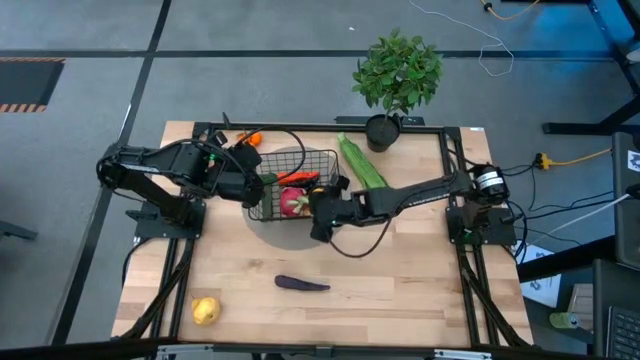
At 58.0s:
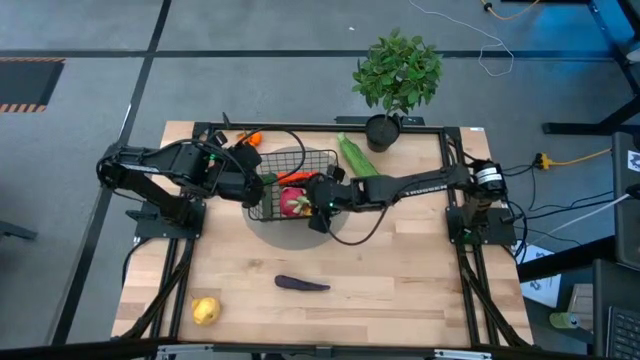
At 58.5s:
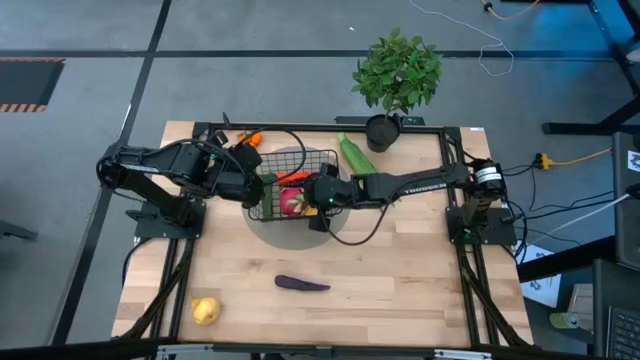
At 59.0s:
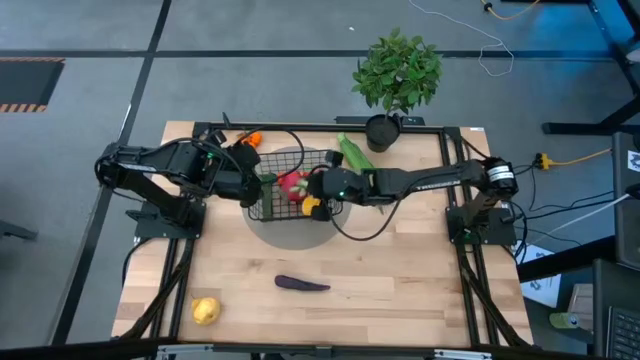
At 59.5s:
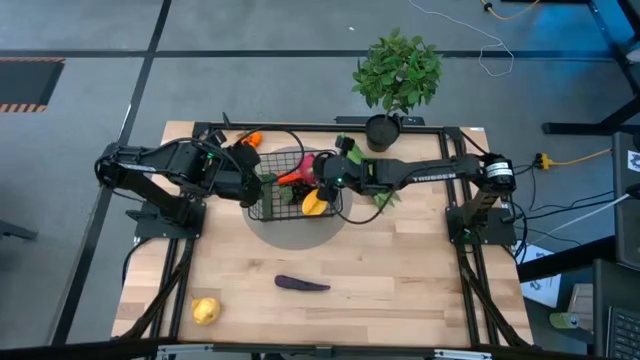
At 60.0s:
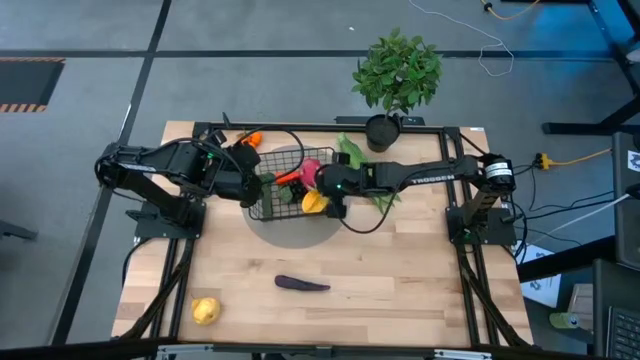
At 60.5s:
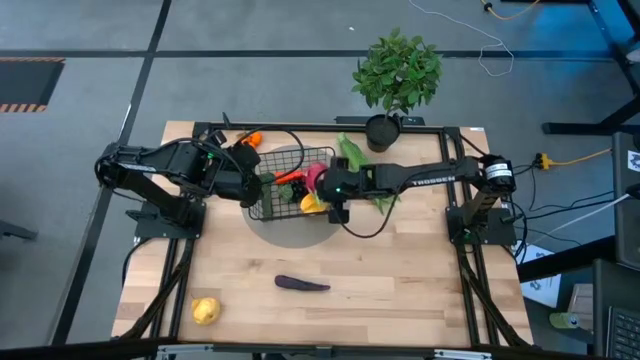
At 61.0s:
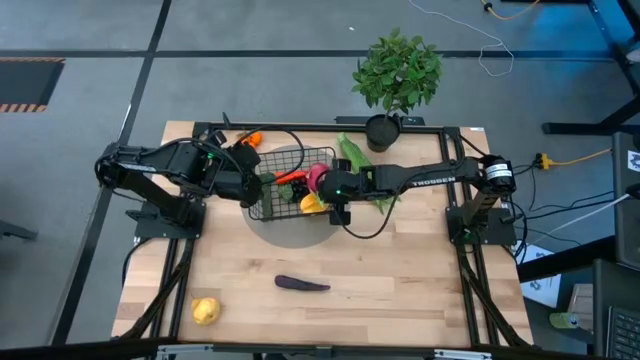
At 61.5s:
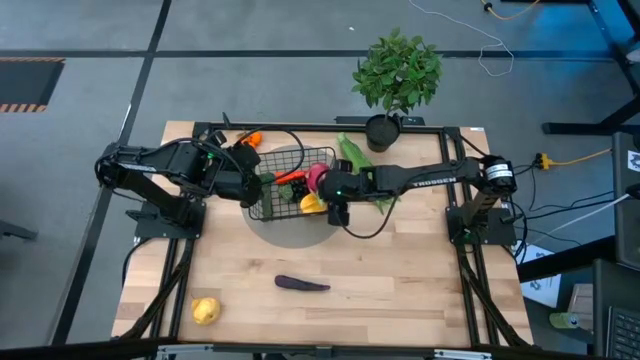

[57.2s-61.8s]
Task: Build produce basket
Adjust the pink dragonfruit in the black wire basket

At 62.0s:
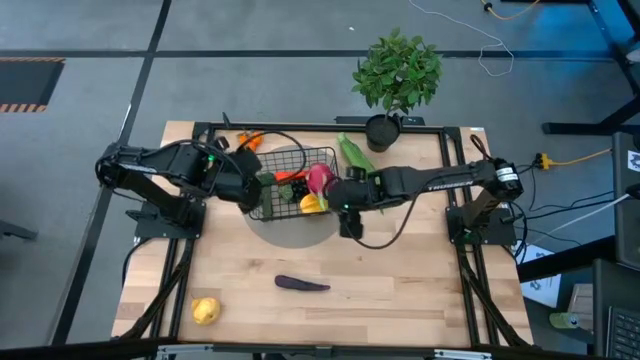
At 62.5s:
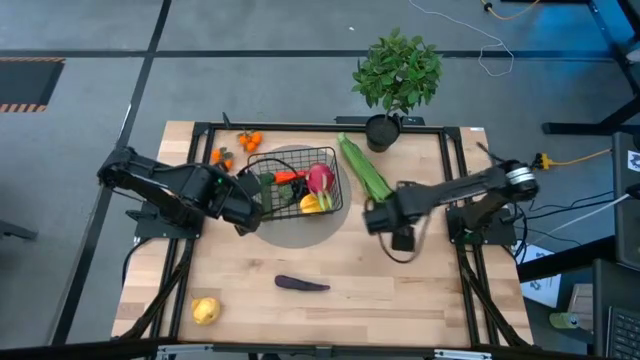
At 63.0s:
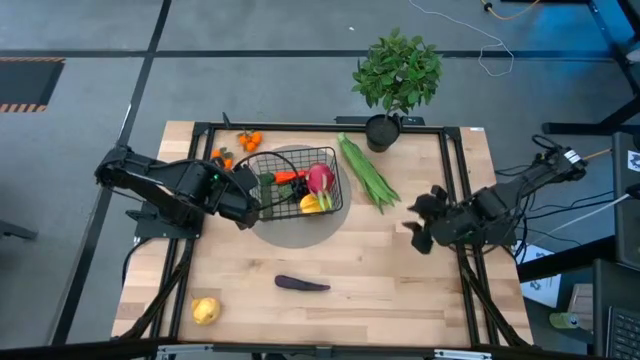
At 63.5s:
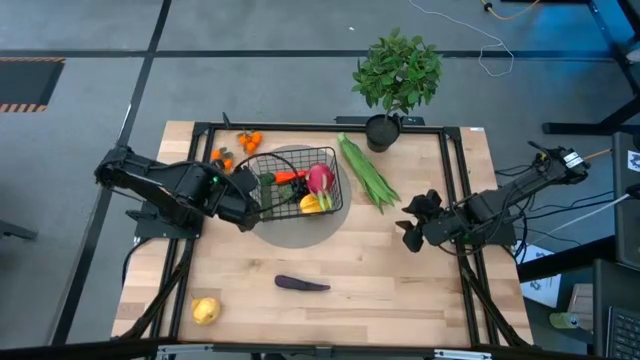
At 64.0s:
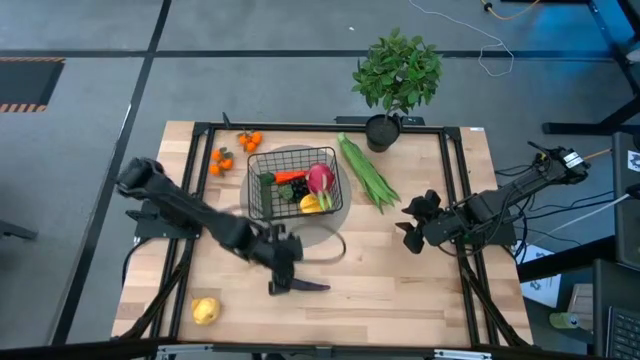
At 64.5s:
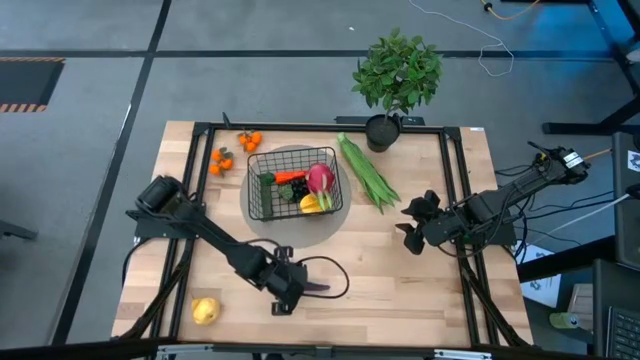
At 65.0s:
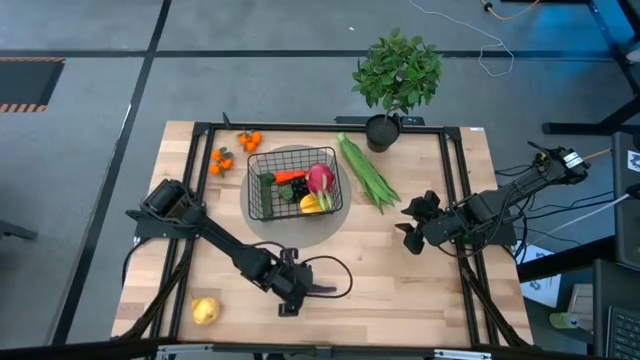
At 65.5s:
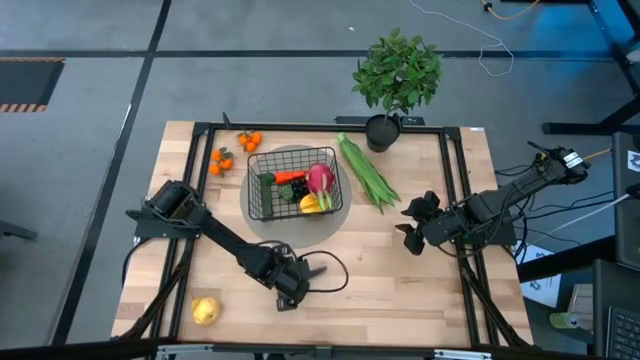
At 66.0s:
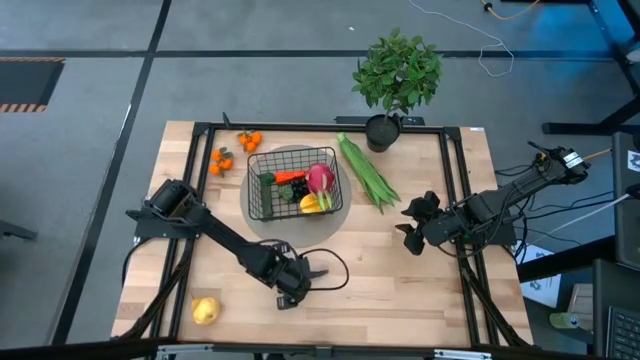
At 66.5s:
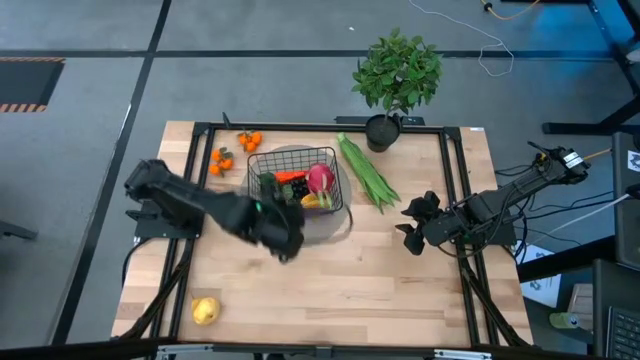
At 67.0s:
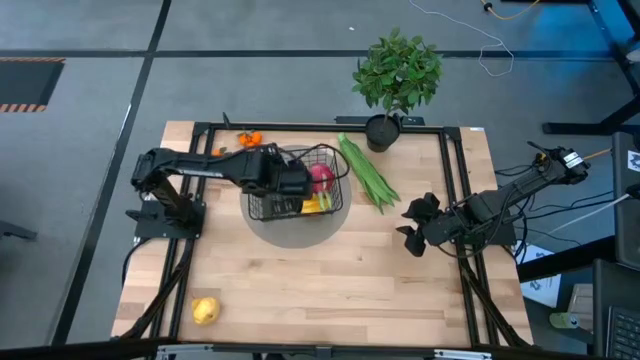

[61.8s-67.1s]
Put the dark purple eggplant into the black wire basket

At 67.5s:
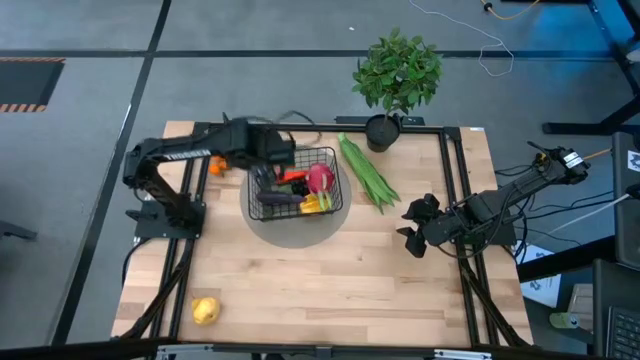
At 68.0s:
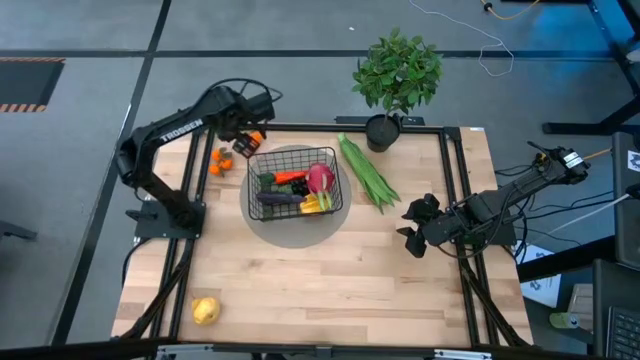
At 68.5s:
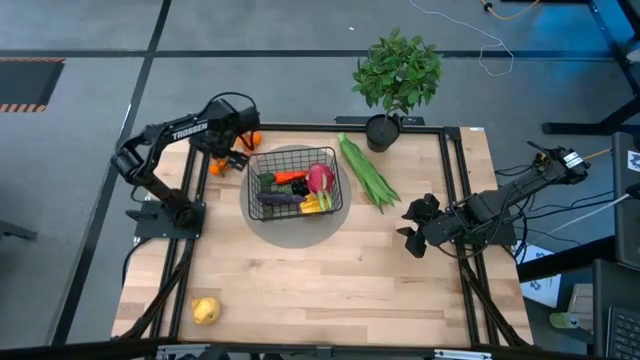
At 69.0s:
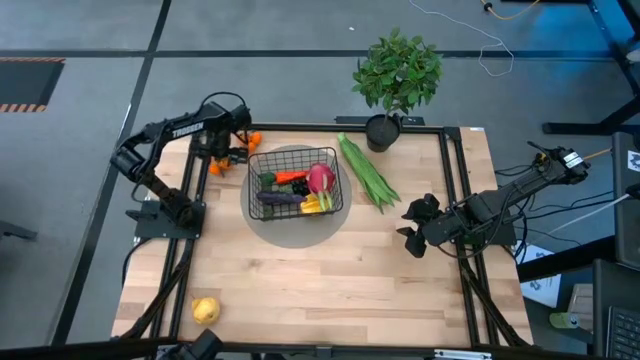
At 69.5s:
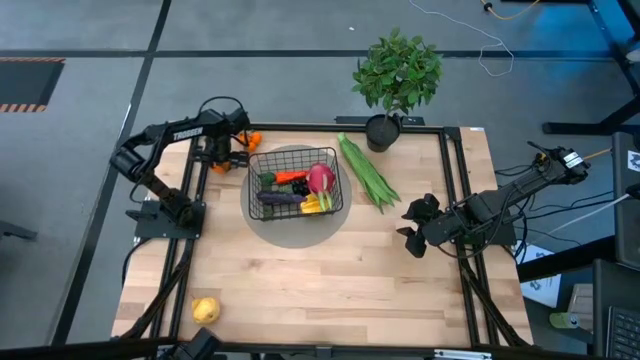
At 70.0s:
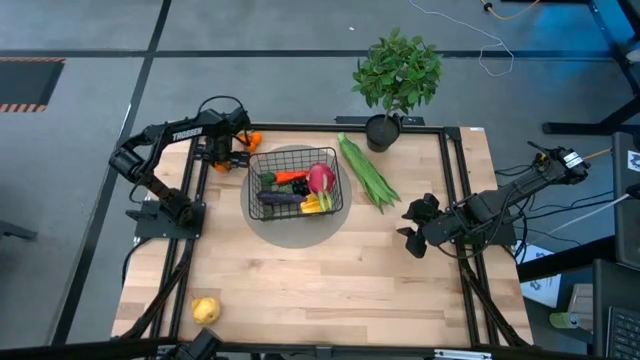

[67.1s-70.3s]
Put the bottom orange tangerines into the black wire basket

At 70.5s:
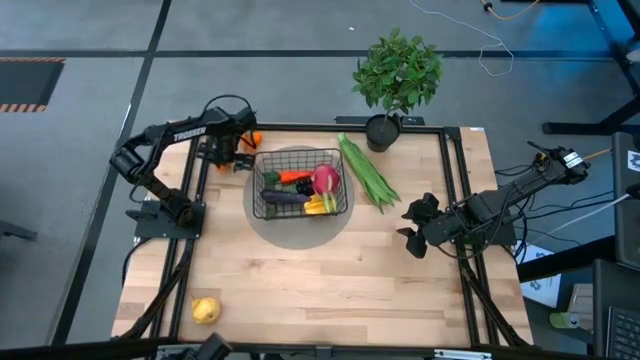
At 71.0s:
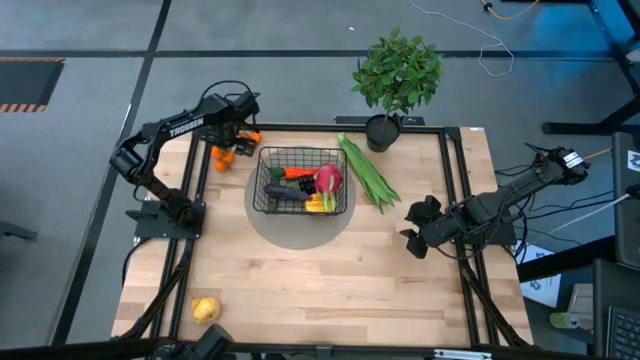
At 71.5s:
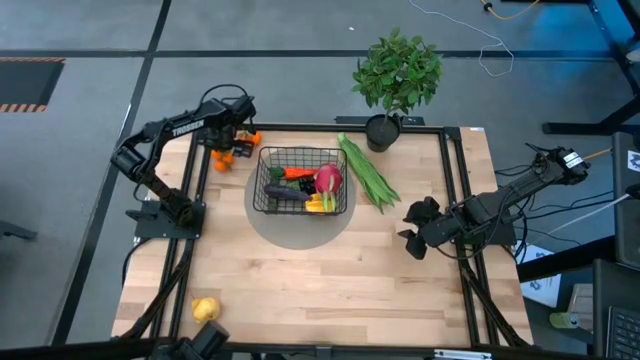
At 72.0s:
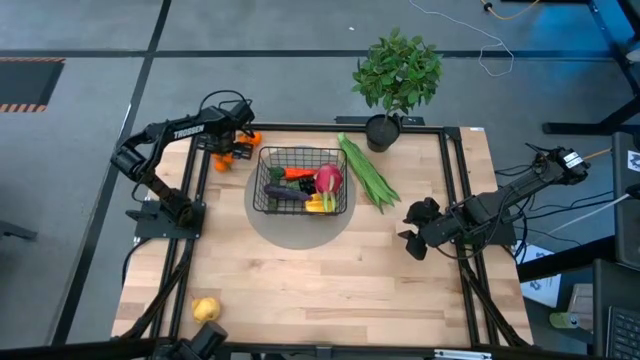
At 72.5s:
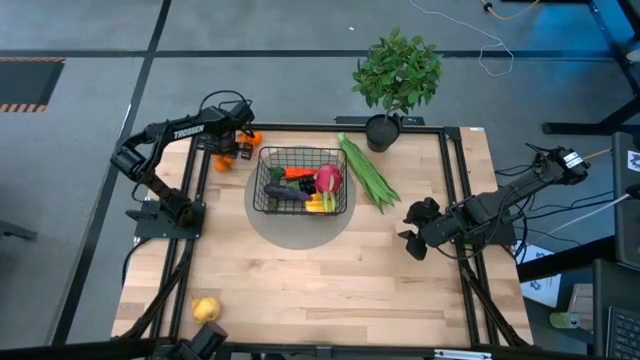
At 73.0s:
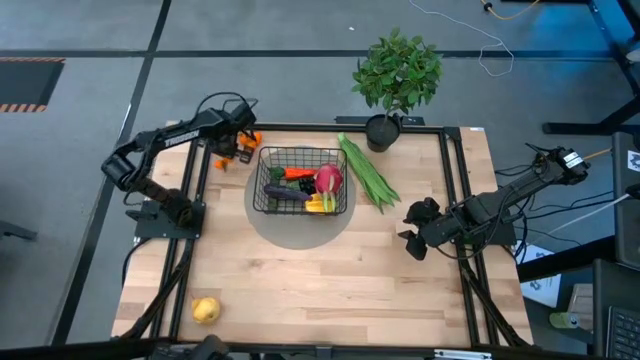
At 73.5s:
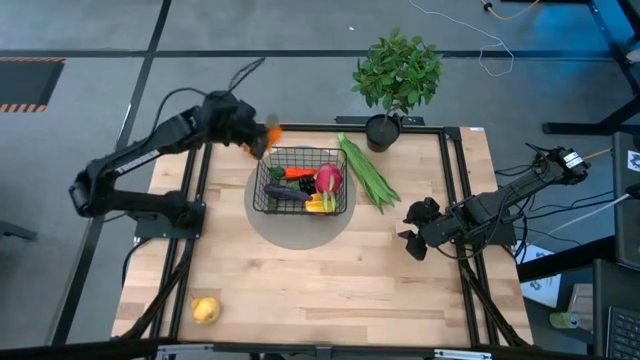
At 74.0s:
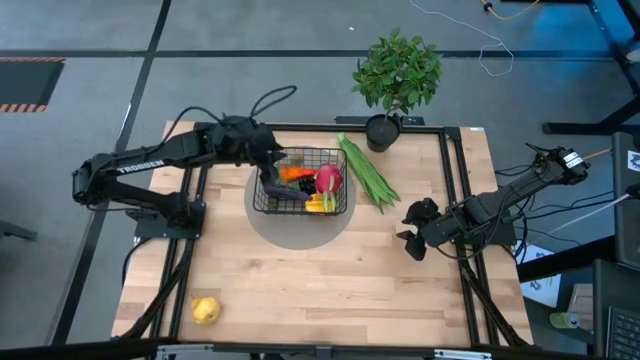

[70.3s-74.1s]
Put the bottom orange tangerines into the black wire basket

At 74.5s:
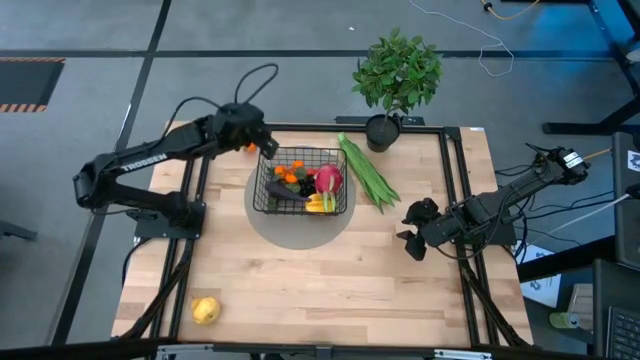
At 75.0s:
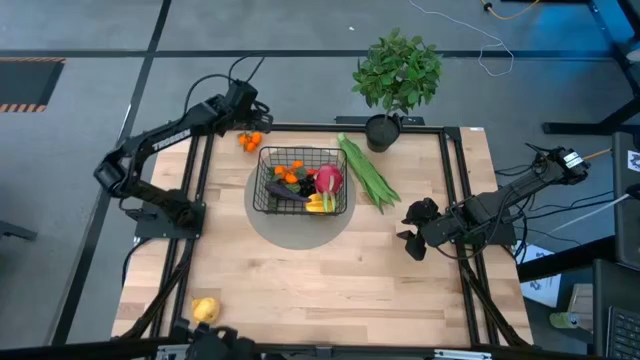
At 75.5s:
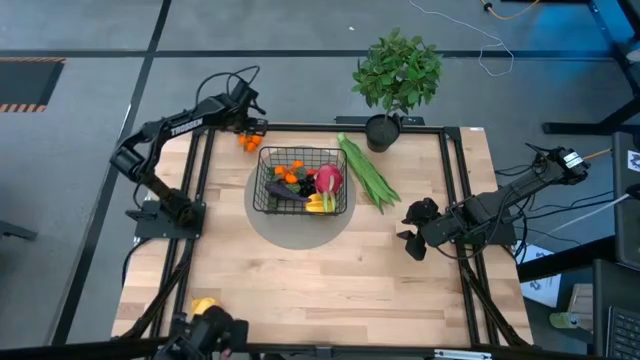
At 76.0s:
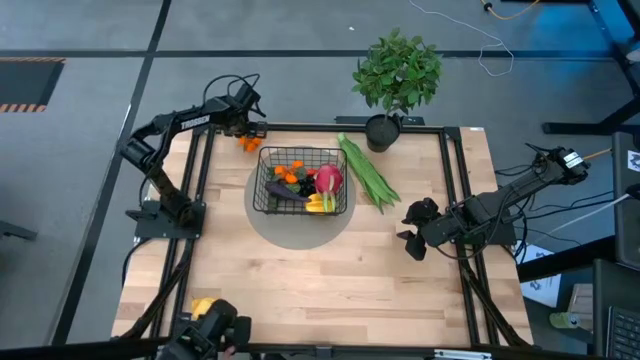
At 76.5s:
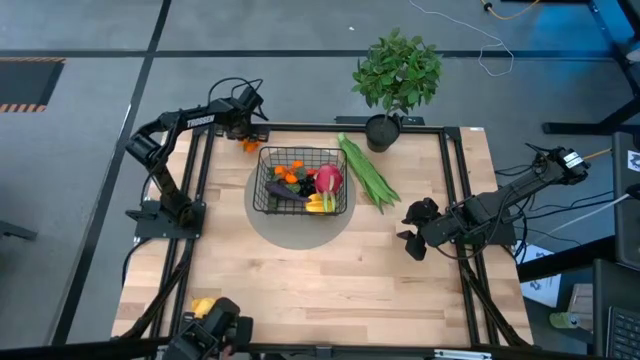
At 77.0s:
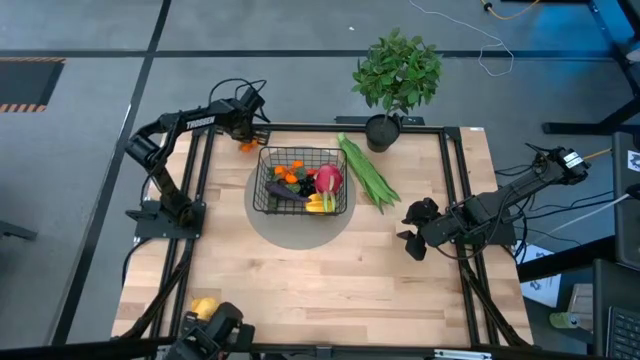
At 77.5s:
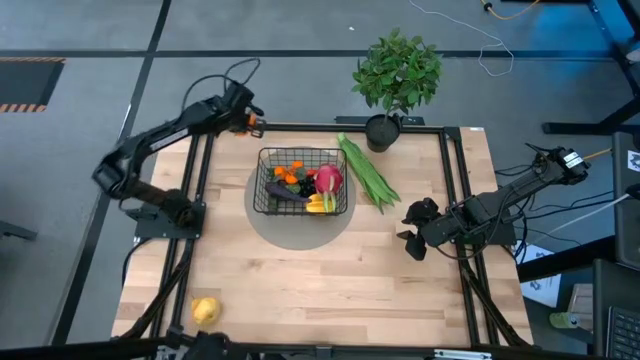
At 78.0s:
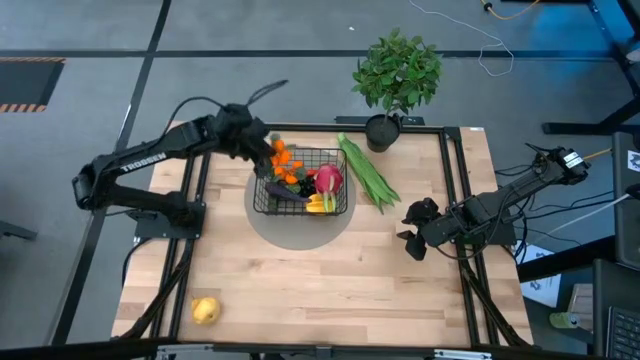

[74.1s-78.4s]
Put the orange tangerines into the black wire basket
